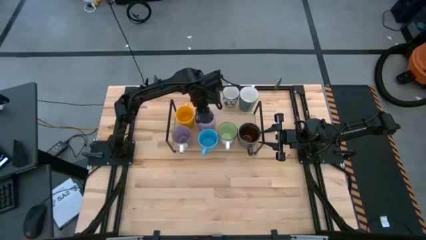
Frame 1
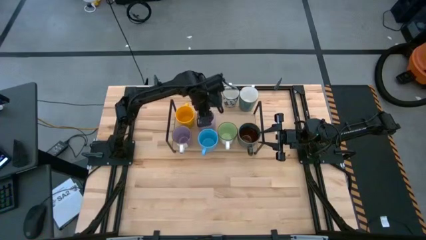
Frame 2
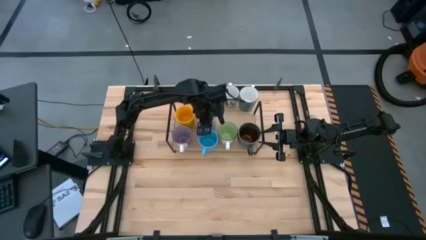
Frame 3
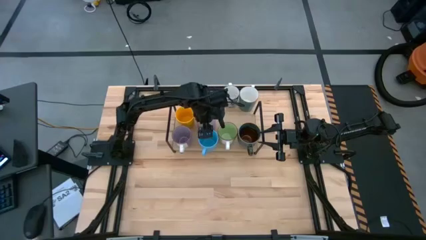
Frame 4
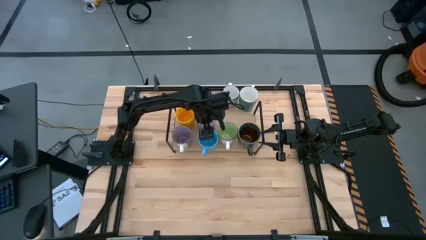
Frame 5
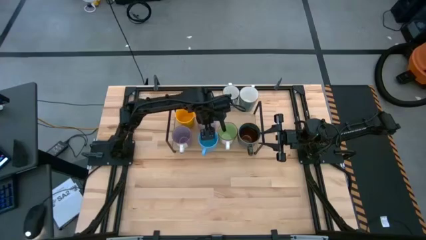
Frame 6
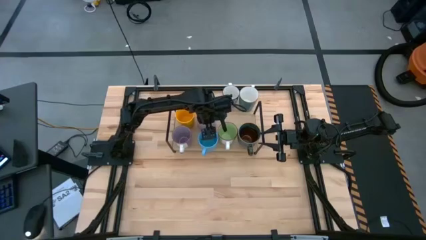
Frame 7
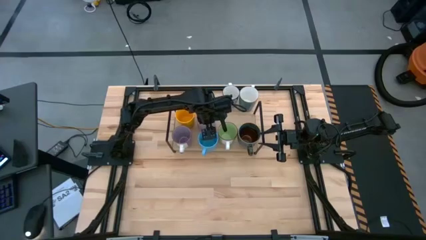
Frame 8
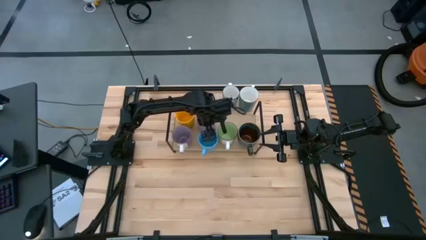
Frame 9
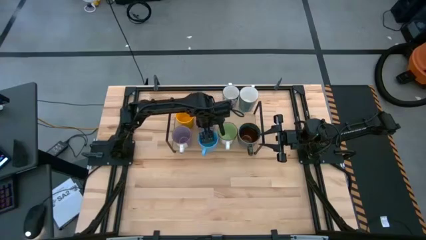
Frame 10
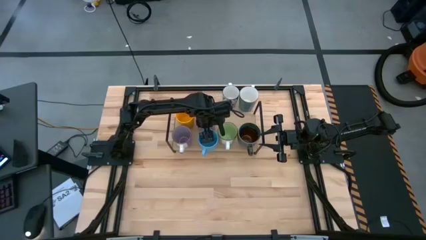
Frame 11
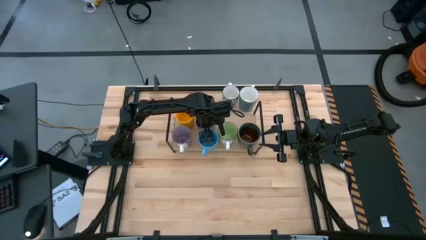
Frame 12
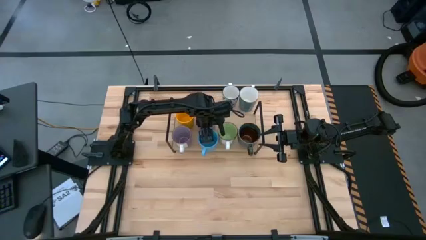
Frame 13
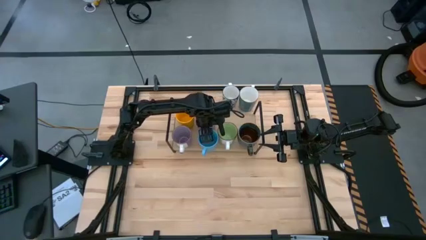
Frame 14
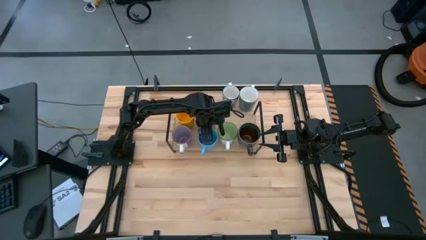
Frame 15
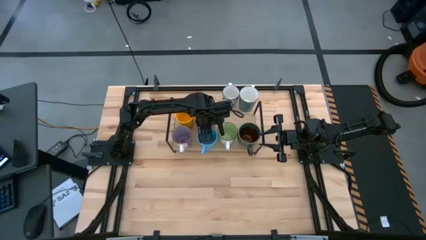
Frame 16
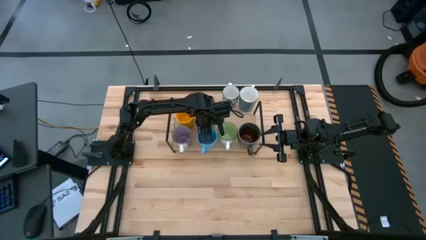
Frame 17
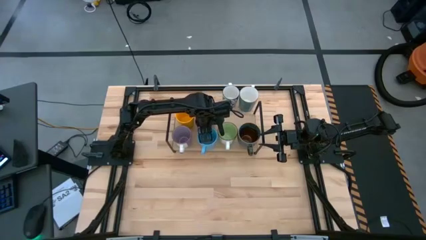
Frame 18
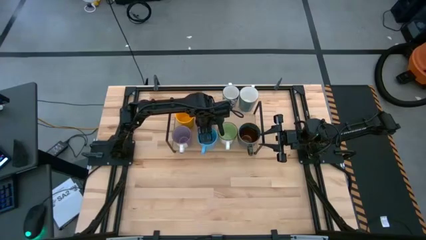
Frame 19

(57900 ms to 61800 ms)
Task: Place coffee mugs
Adjust the mugs on the shelf

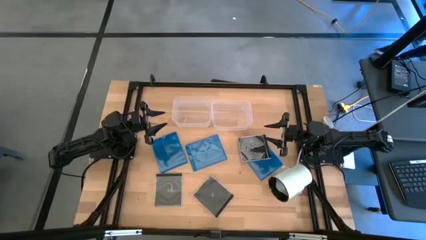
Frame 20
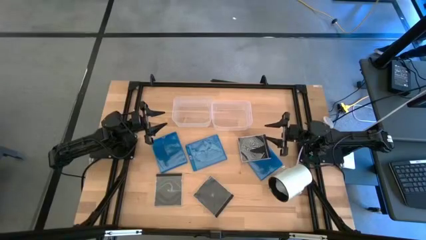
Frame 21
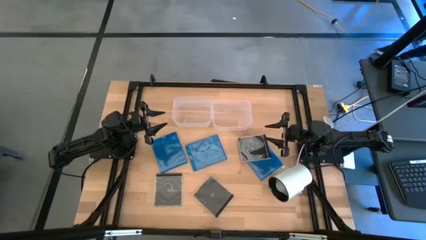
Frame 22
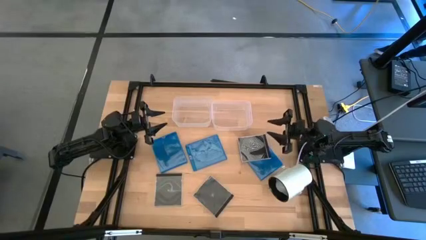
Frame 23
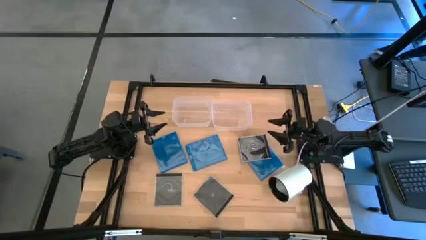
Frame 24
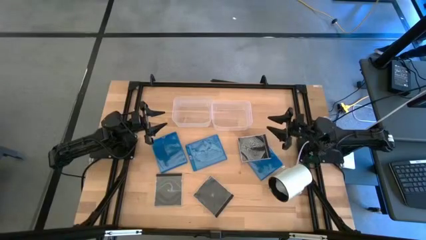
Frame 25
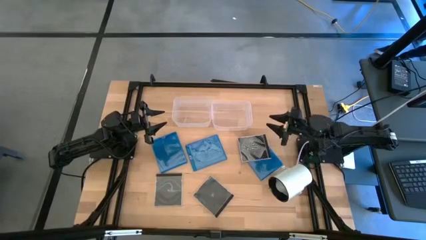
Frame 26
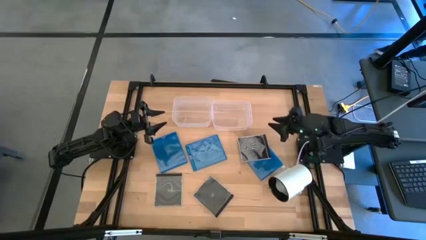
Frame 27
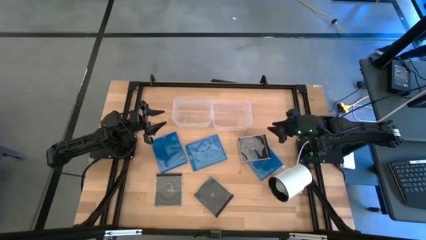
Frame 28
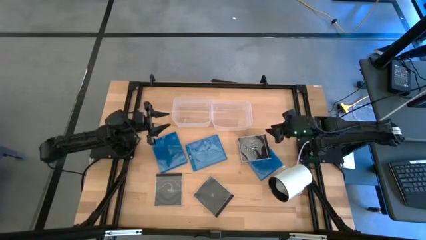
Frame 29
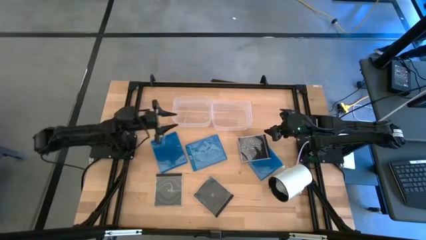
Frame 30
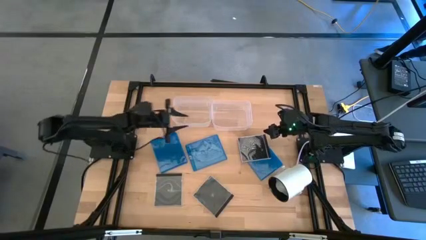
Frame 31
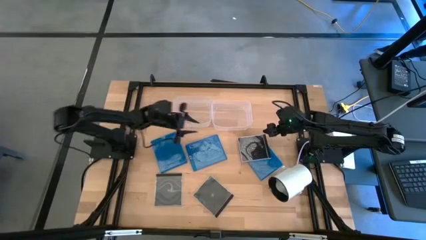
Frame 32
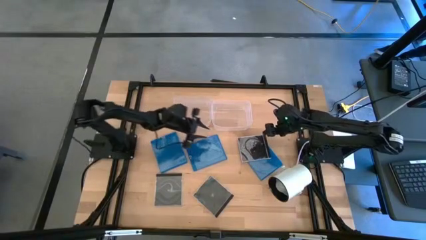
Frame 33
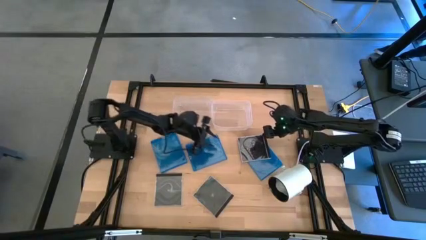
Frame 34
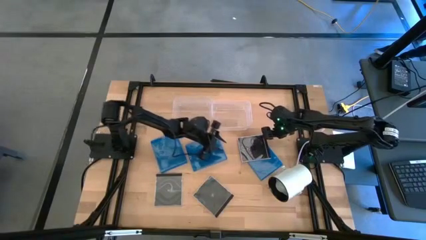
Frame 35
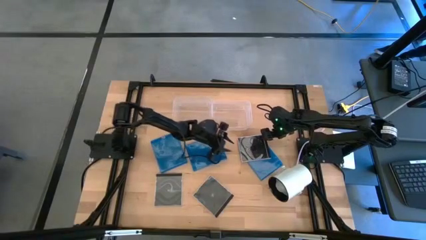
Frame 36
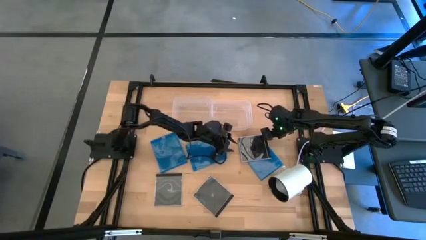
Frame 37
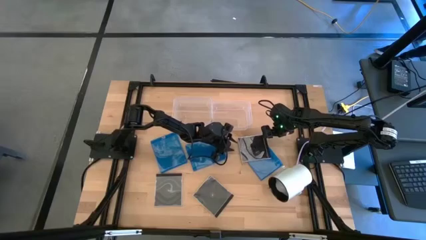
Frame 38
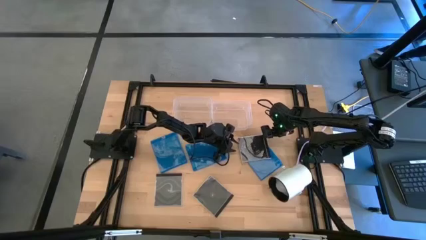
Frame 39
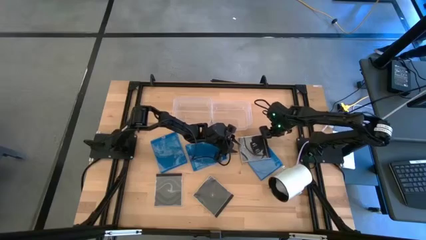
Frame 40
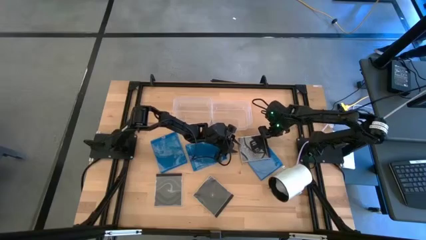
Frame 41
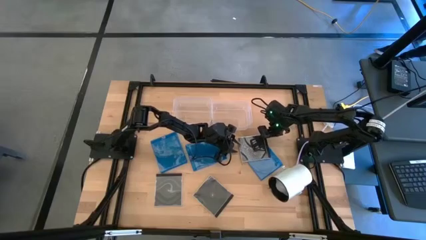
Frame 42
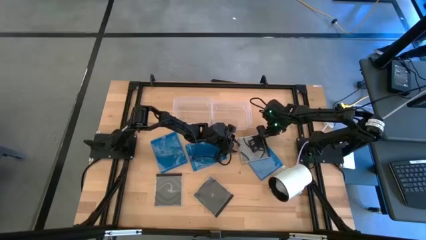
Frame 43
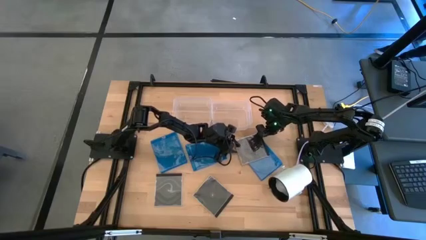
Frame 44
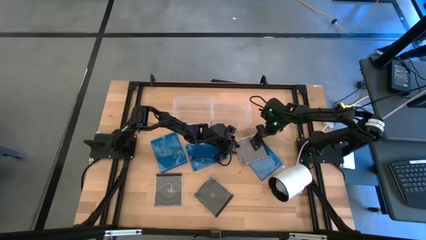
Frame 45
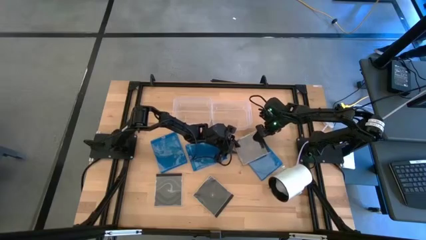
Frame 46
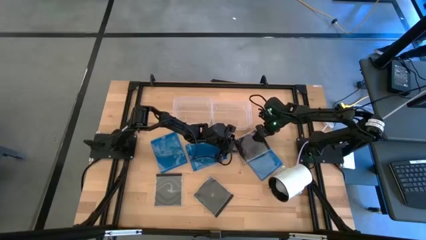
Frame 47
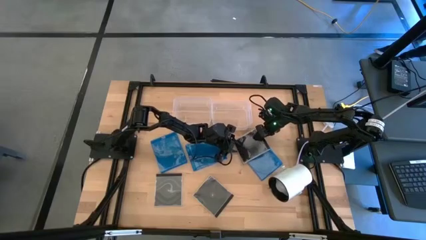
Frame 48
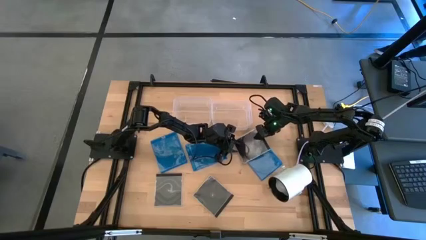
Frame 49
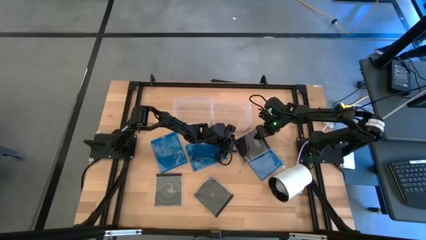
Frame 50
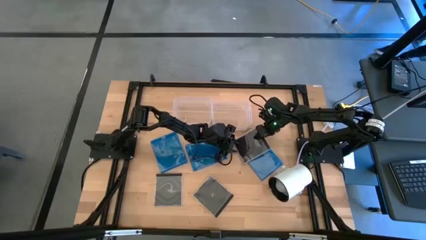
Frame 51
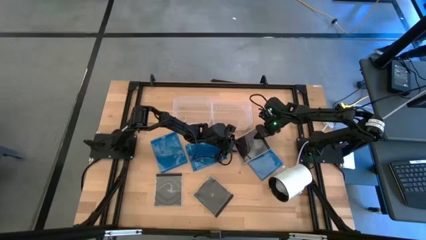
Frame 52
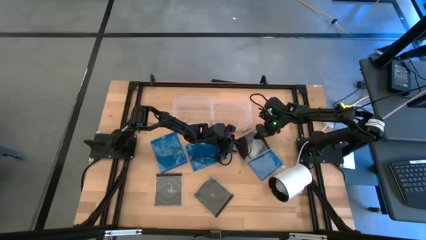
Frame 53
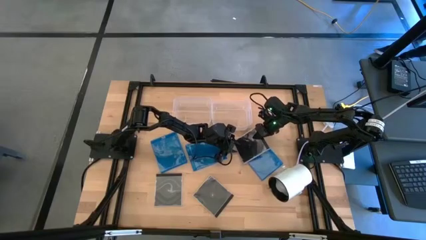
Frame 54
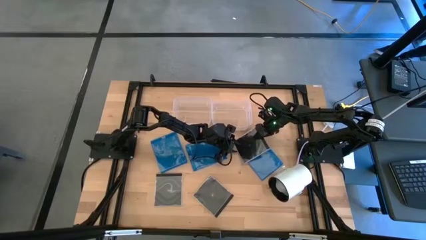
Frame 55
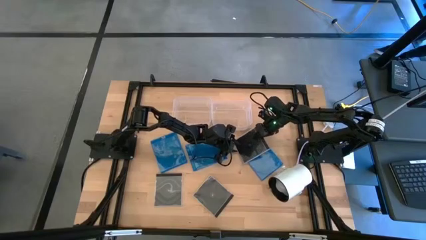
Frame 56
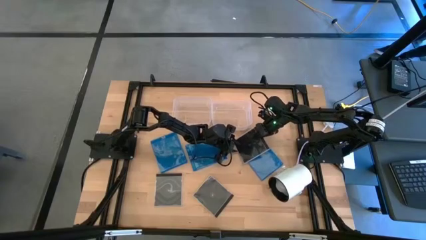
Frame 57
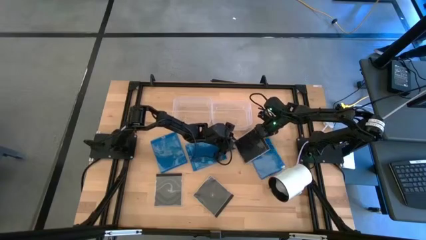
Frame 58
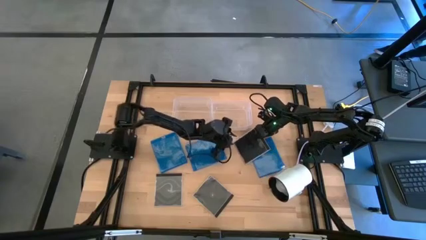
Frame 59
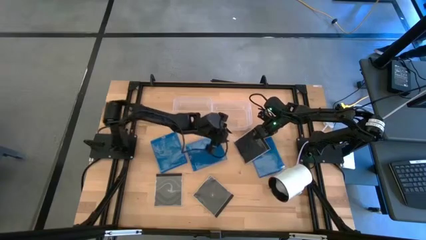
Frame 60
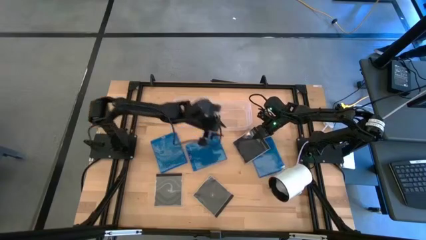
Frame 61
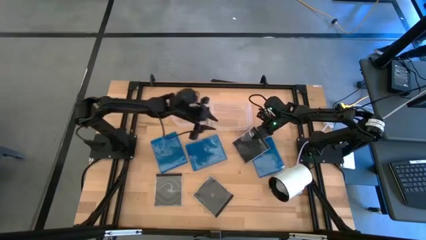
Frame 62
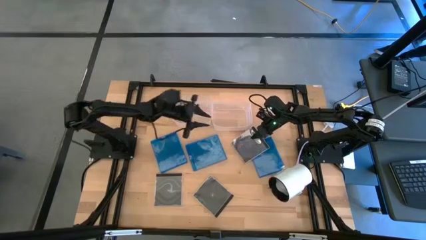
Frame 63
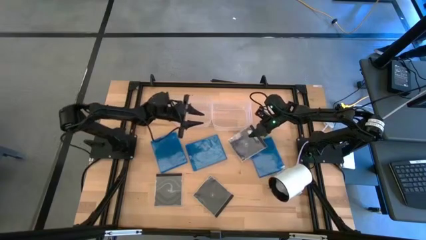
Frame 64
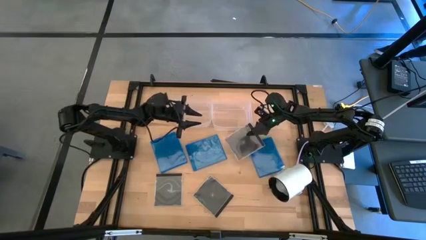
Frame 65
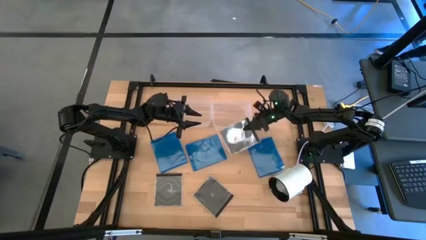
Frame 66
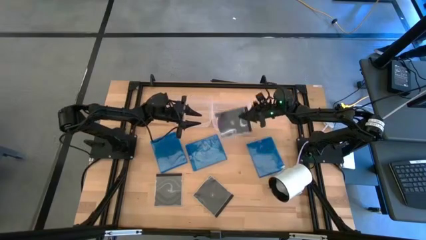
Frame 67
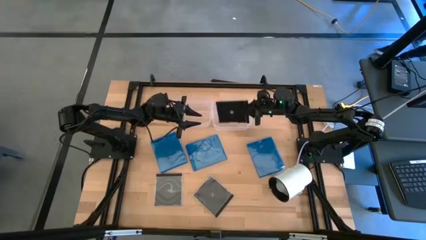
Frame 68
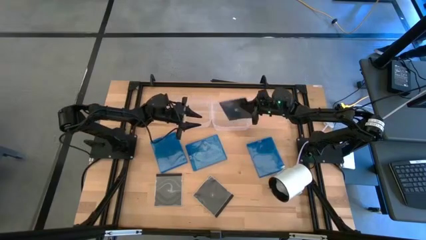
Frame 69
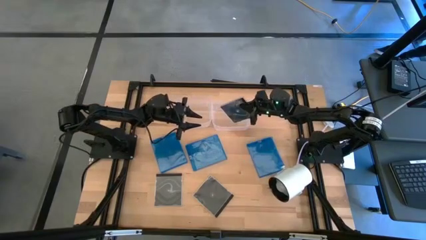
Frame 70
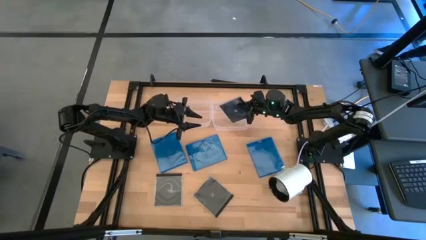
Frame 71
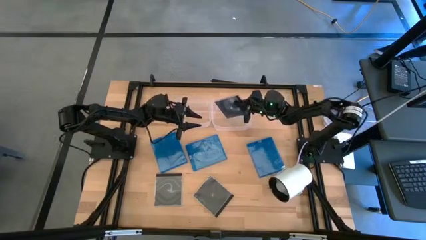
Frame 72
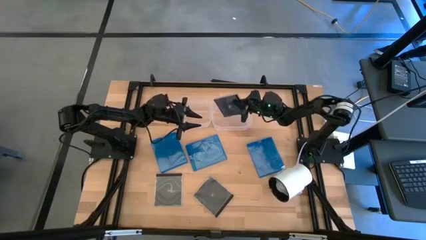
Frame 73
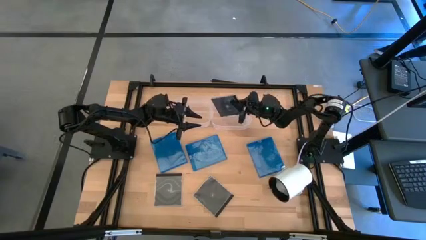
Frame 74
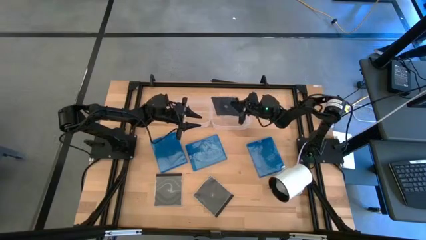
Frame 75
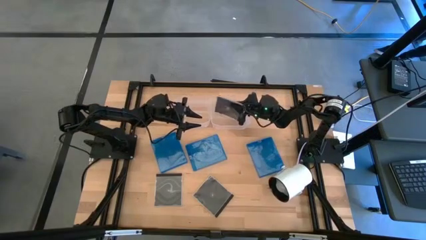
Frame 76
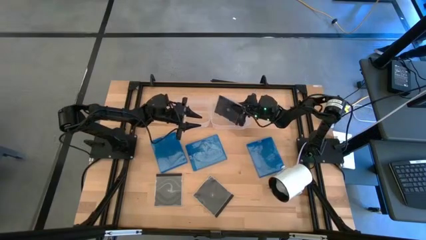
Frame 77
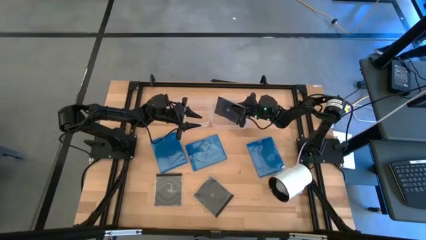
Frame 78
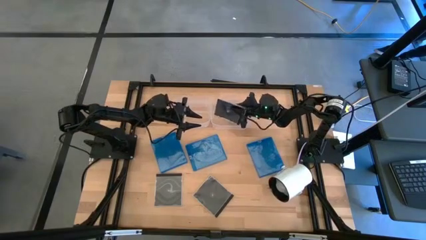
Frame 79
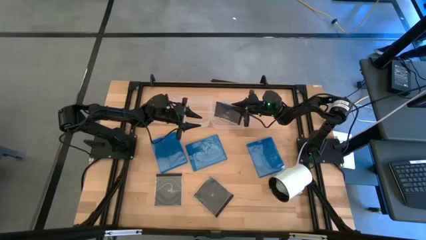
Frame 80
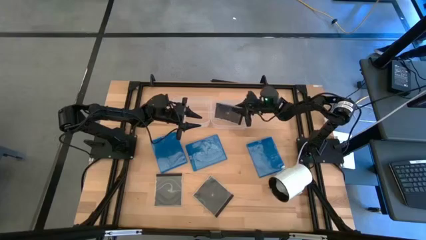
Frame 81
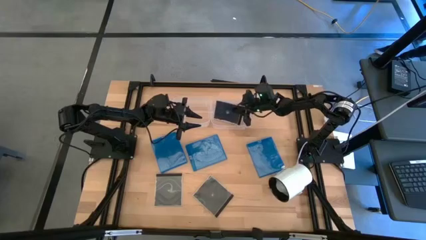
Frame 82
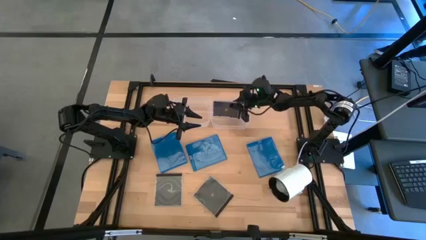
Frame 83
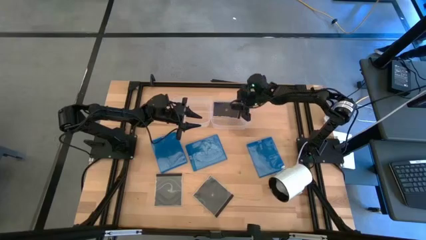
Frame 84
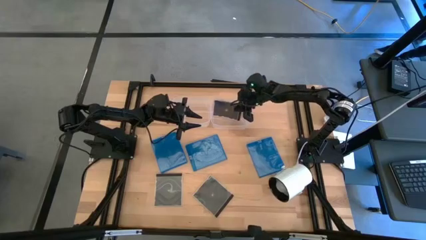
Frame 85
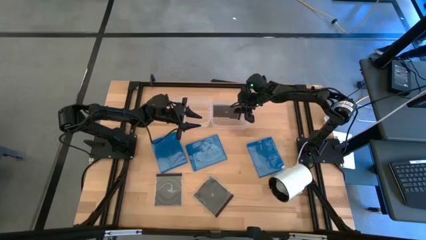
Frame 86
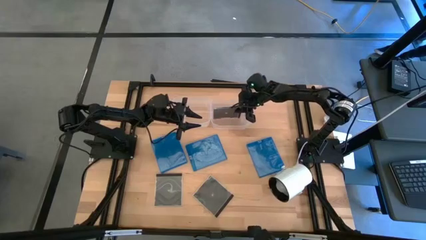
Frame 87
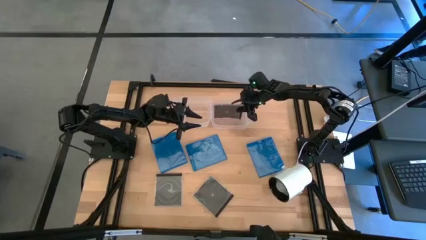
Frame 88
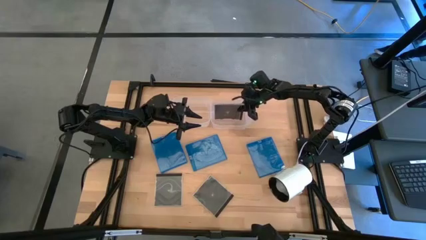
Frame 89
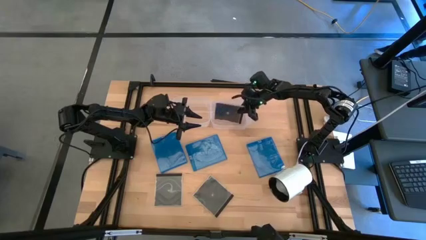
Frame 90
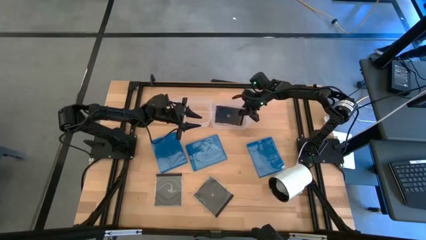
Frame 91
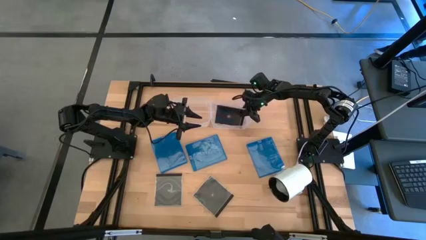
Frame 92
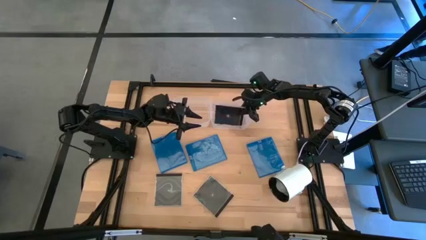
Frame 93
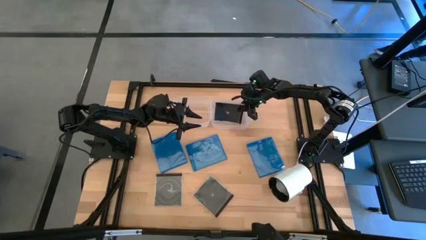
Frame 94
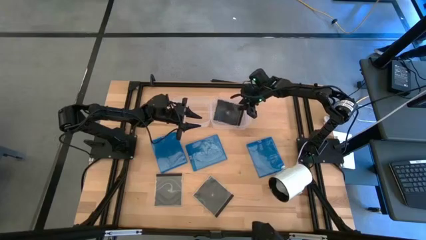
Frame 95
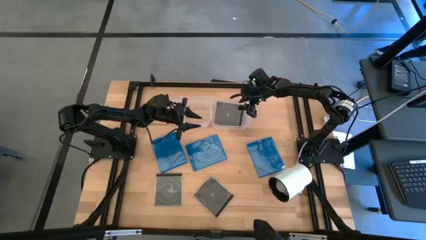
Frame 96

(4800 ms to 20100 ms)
Task: Pick & place jewel cases by type
Put the top right black CD case into the right transparent bin
